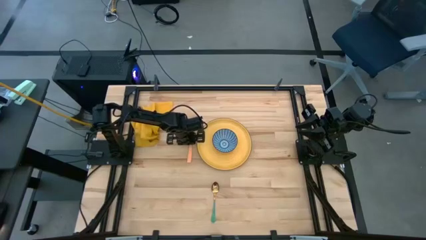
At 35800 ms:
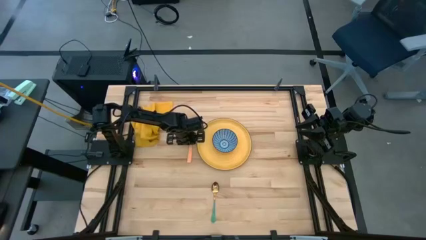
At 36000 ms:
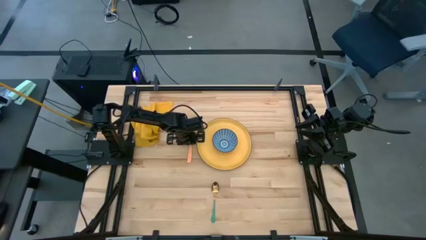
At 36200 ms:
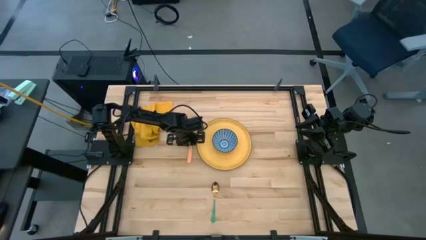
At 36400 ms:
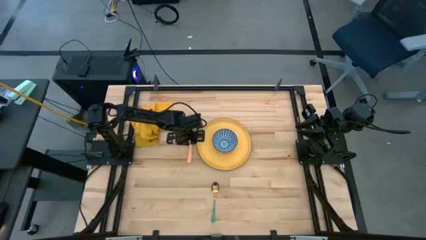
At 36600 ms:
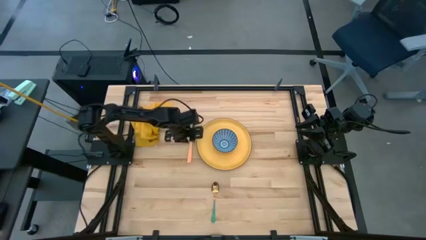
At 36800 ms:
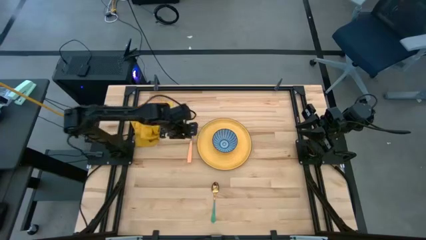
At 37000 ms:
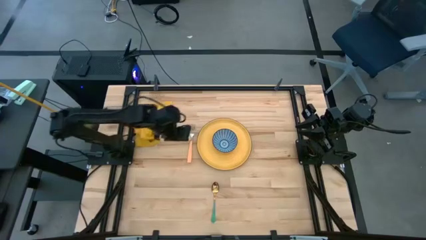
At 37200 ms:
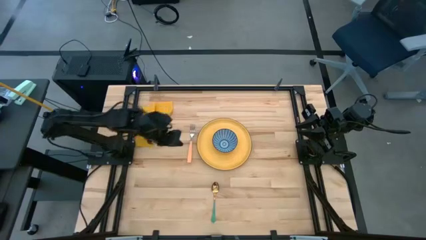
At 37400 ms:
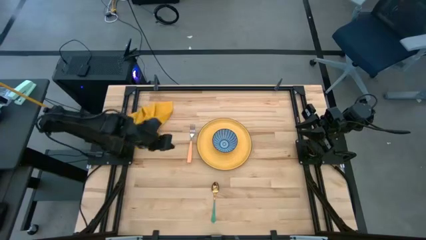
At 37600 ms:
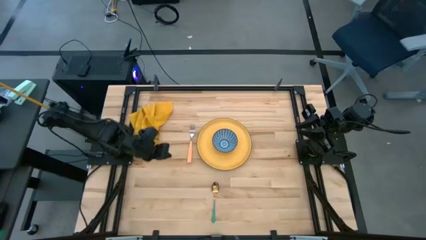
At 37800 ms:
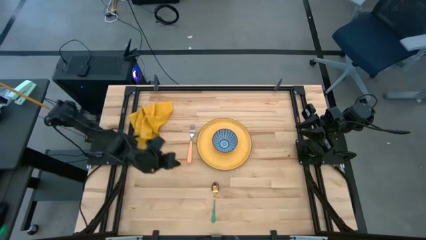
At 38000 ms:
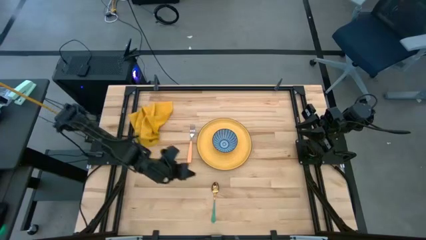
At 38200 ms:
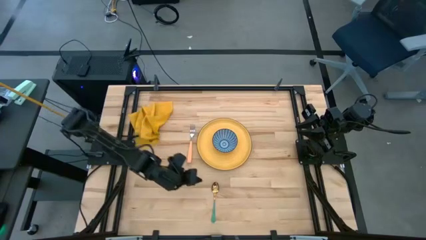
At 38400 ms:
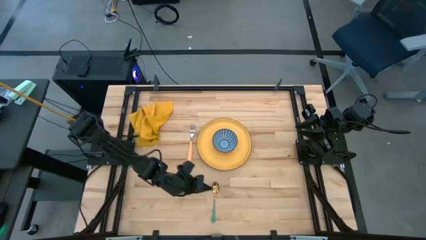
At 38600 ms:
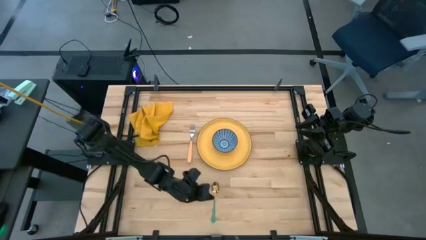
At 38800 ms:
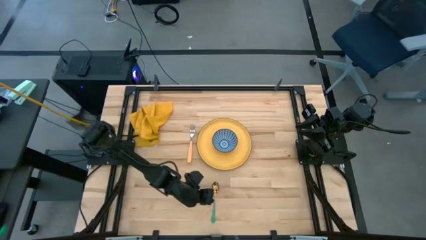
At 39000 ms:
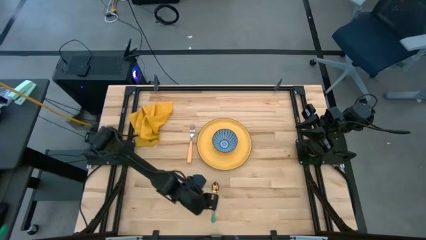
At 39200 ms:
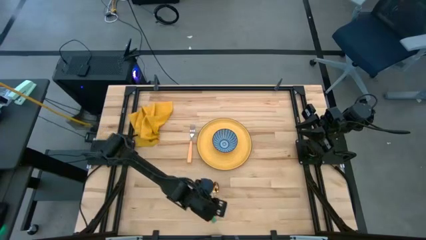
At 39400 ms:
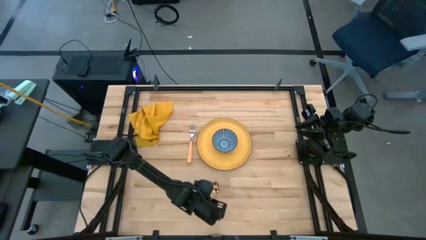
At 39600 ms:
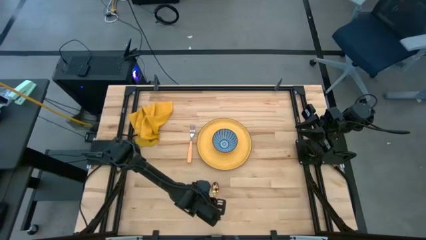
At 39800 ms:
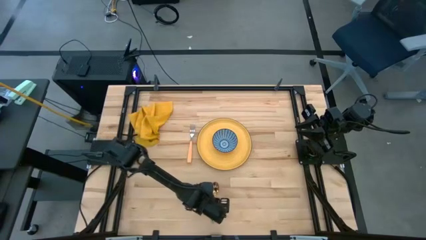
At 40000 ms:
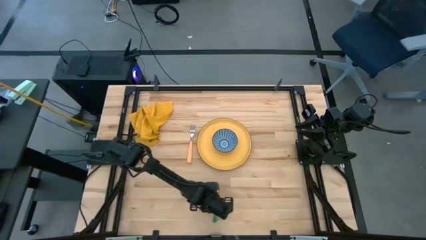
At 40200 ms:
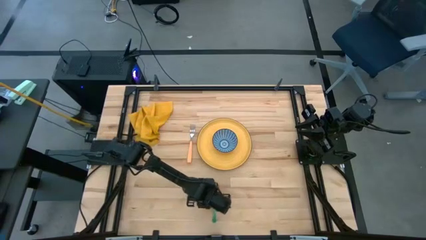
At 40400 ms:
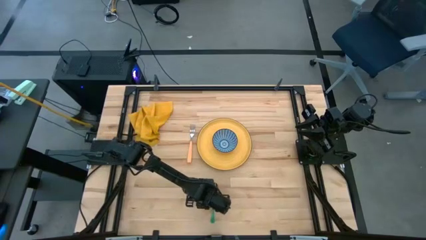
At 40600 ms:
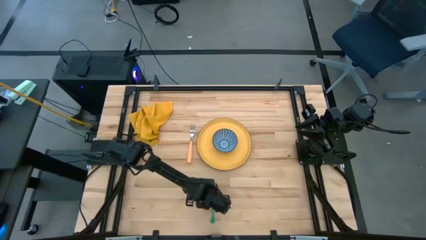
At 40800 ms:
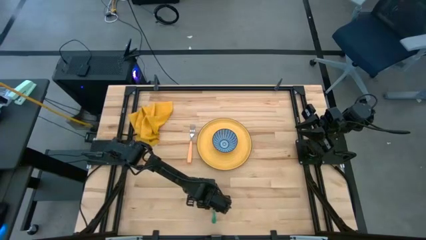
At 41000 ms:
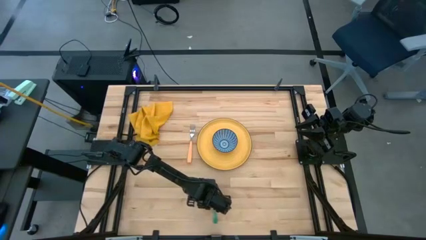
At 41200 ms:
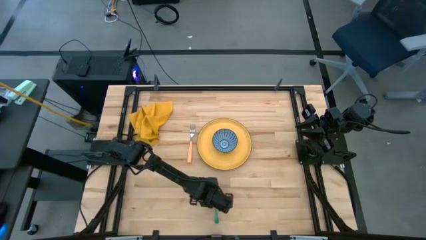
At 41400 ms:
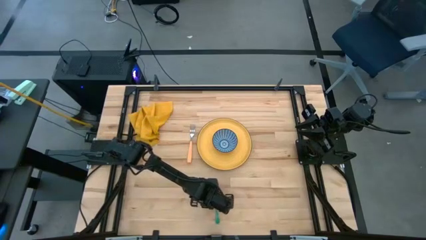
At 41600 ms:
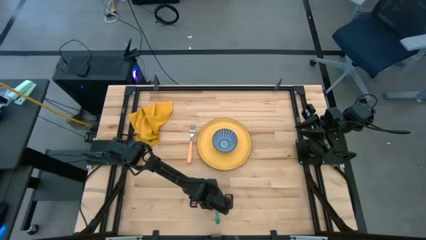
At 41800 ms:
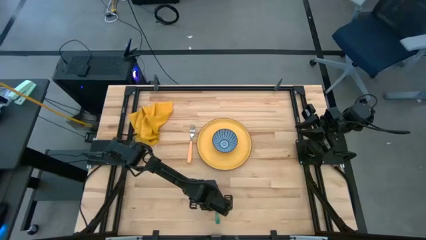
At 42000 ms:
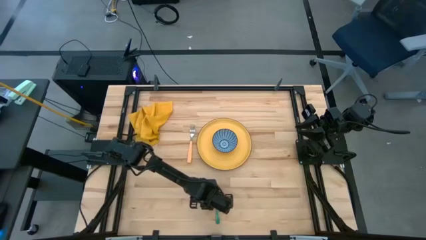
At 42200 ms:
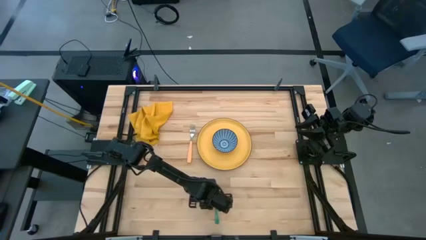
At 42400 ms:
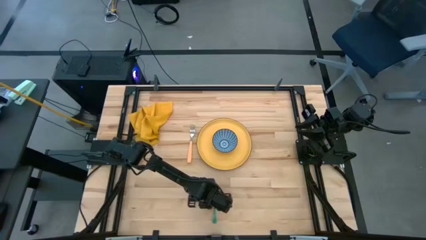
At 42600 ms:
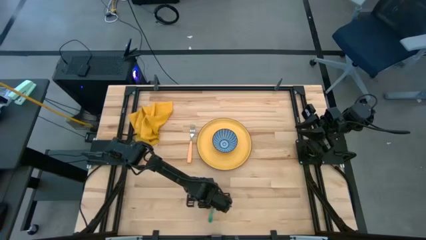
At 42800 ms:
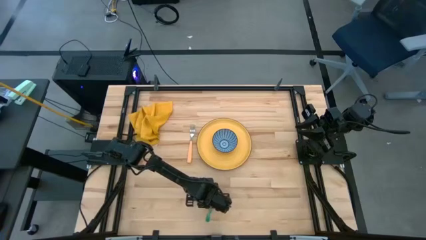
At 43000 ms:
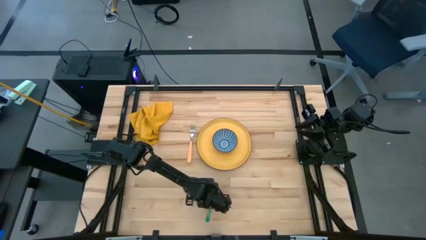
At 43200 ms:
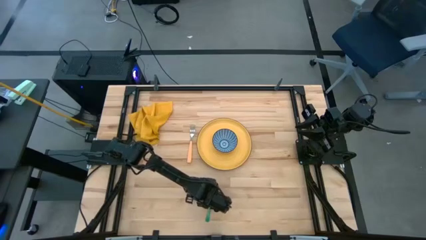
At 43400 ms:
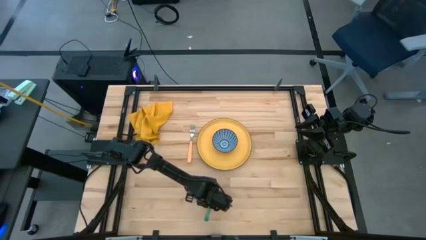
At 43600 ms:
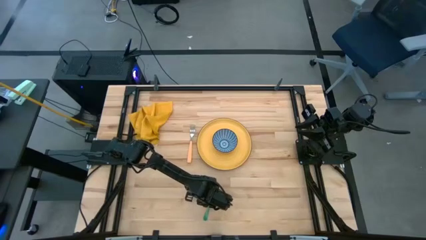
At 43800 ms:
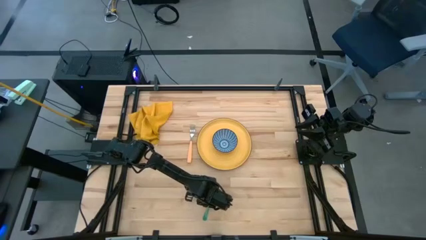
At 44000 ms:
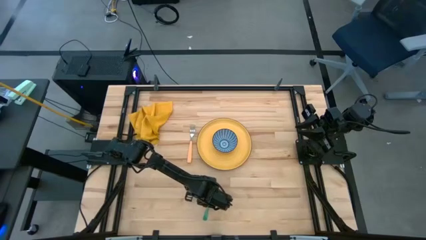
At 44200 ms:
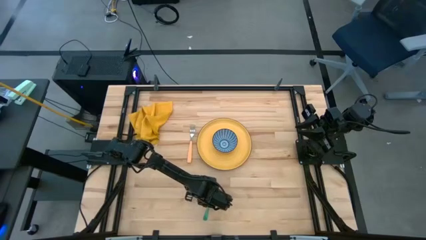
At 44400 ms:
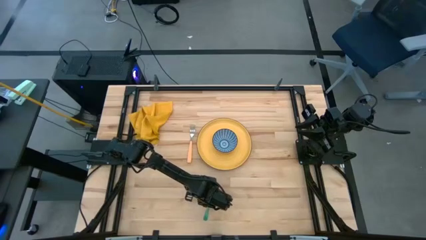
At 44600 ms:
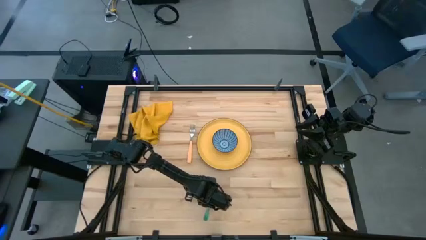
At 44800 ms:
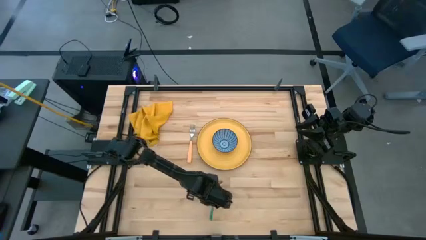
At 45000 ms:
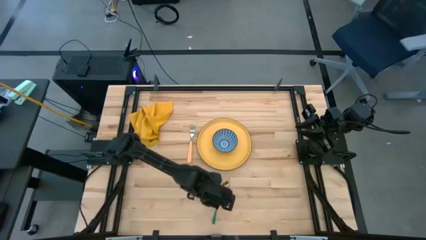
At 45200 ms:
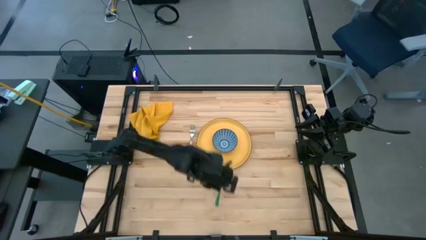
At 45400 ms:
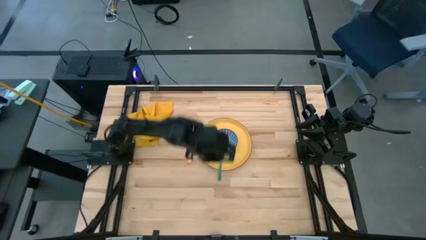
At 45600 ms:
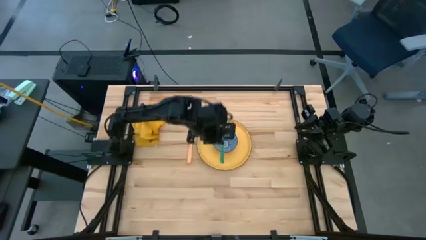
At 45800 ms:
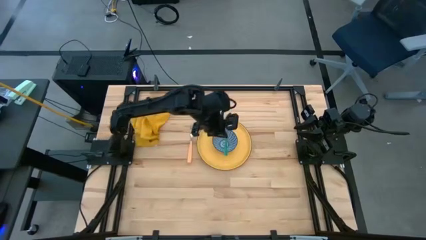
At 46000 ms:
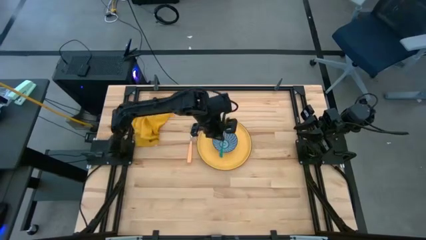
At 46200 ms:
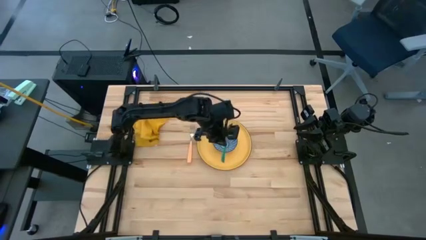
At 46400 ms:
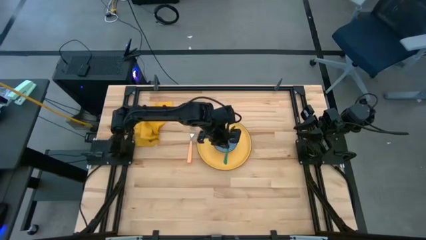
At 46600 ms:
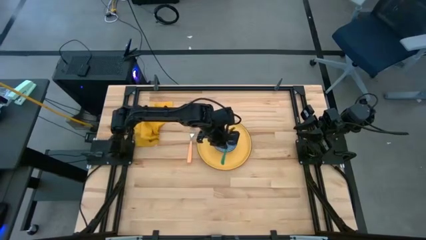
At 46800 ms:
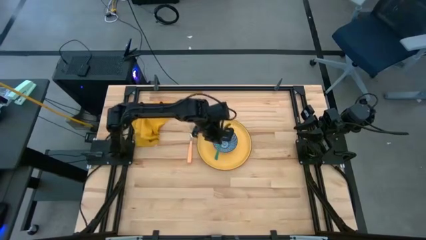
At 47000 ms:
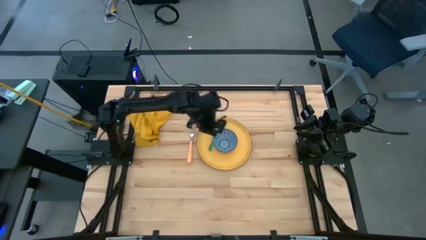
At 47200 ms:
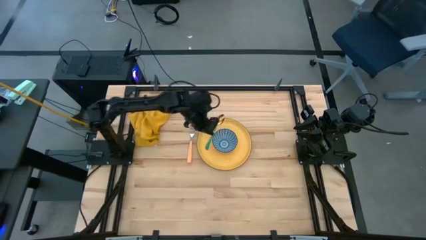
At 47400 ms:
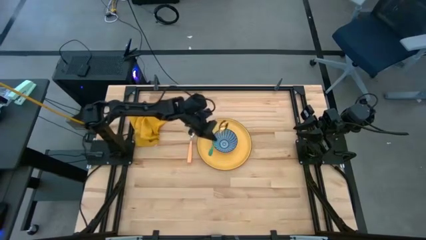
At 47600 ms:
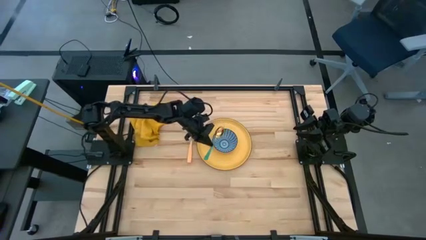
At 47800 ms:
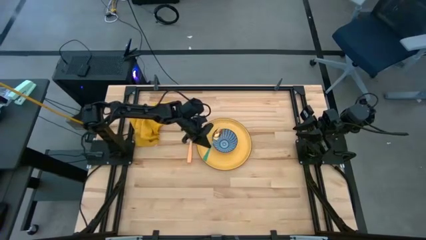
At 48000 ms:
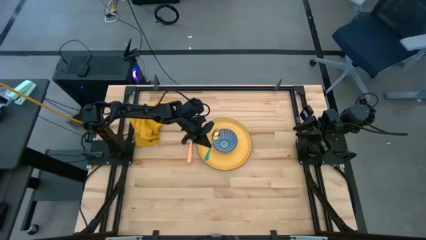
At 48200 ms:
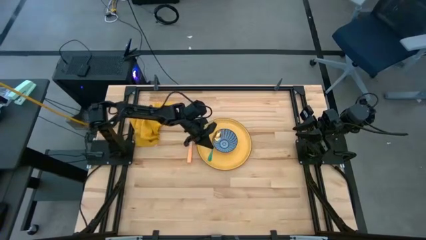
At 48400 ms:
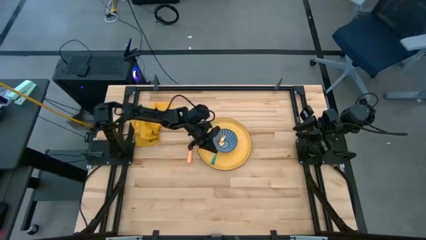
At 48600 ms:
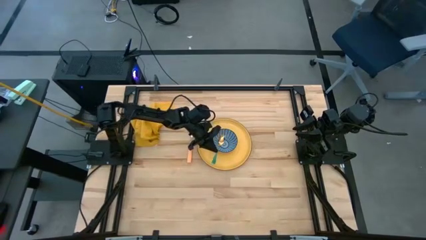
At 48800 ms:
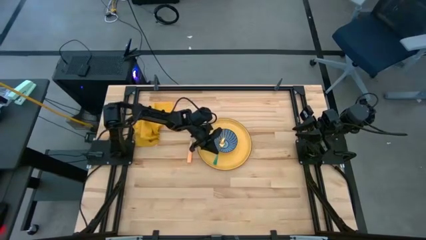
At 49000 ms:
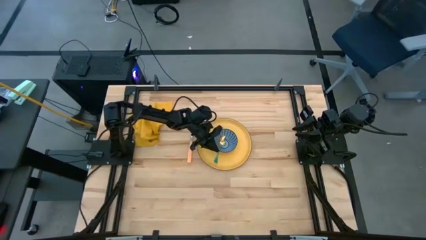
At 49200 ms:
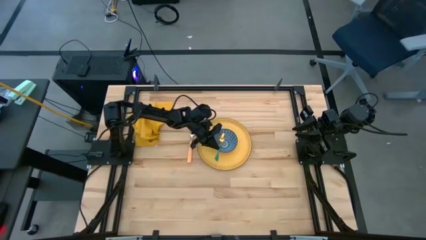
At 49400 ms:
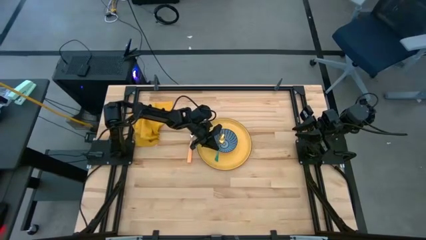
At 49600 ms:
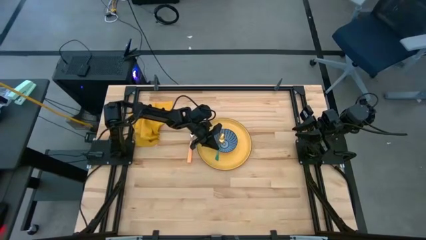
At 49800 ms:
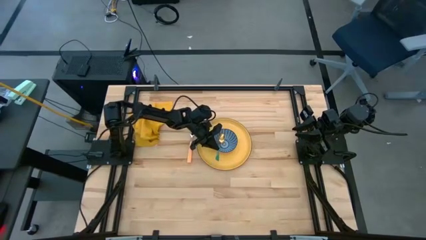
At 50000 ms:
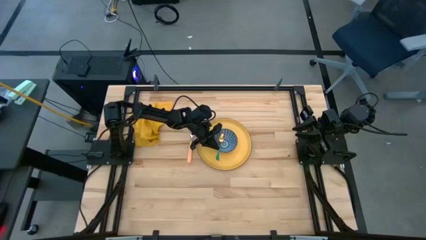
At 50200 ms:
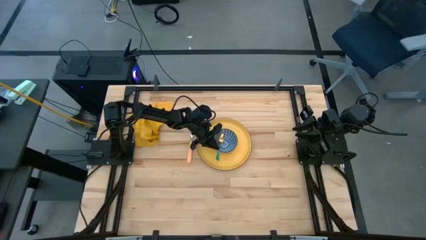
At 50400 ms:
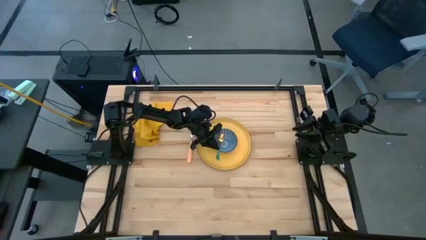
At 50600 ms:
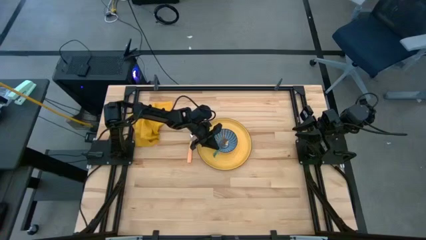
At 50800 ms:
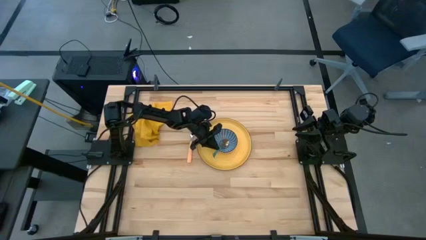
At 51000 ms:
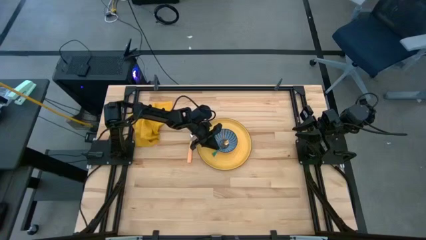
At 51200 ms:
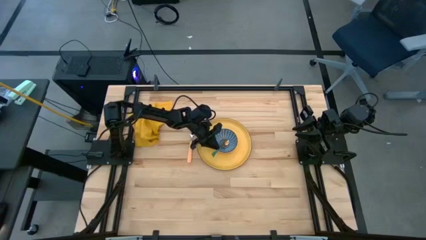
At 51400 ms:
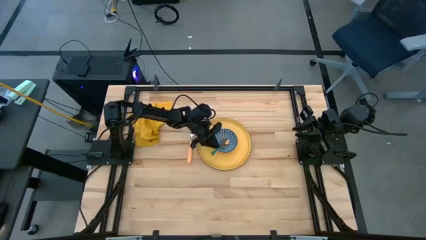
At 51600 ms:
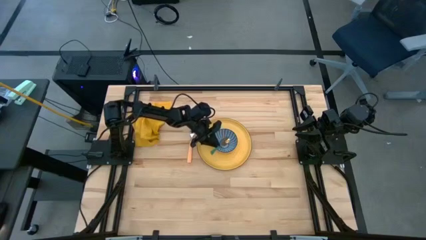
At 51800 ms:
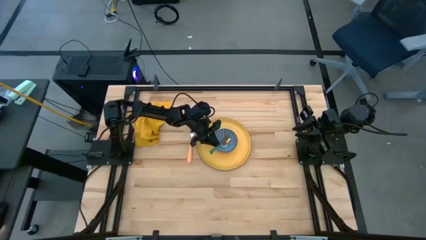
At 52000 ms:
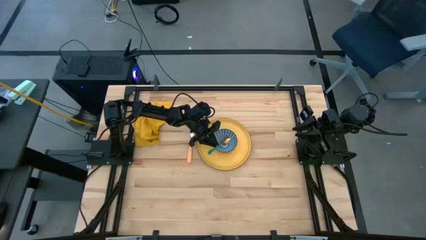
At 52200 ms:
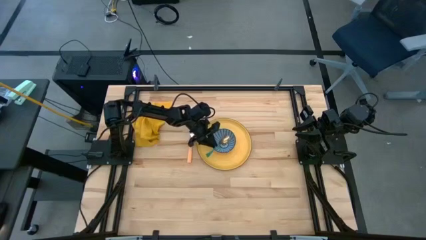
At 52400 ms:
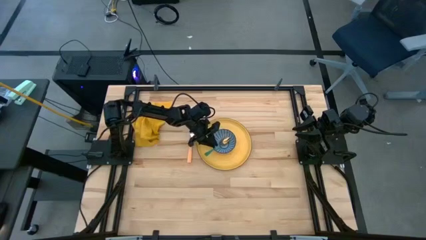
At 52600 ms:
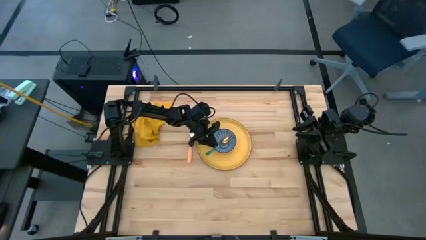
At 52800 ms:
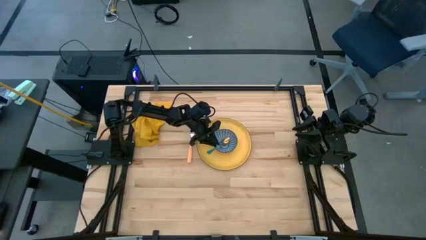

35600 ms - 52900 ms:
Task: Set table place
Put the green spoon into the blue bowl
